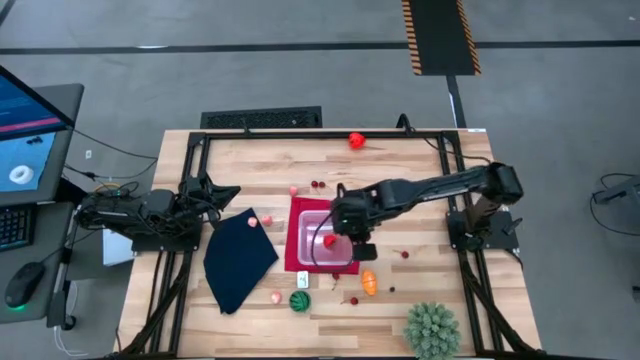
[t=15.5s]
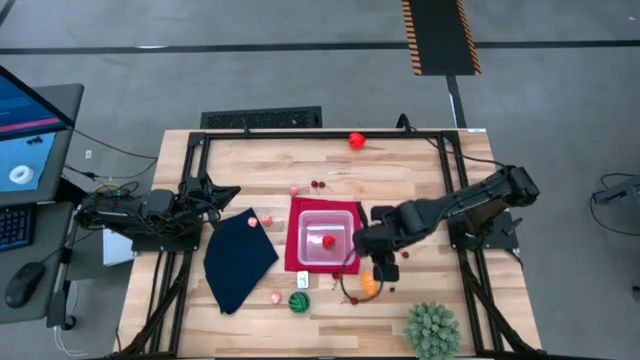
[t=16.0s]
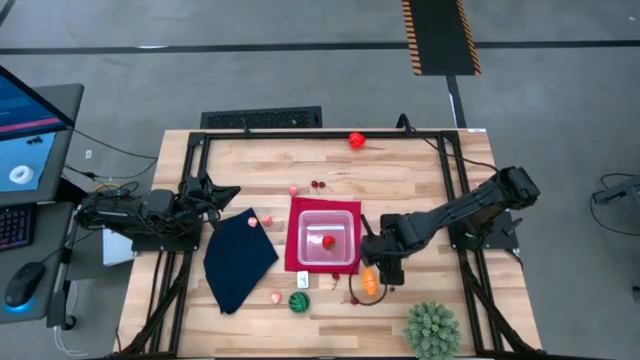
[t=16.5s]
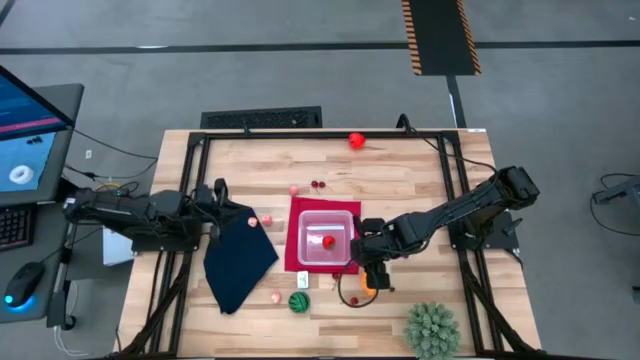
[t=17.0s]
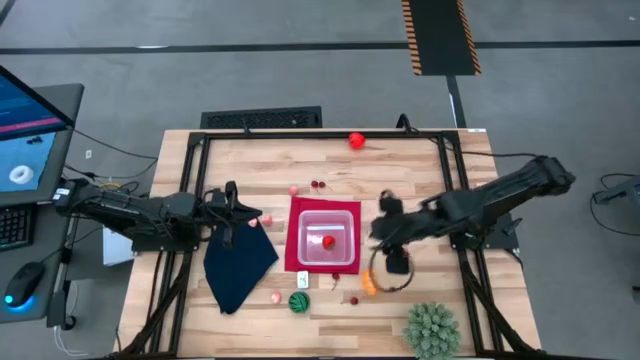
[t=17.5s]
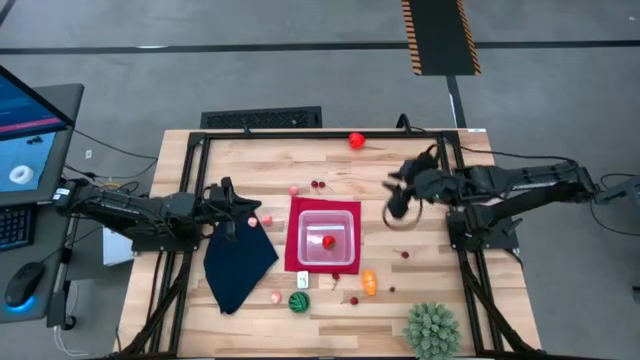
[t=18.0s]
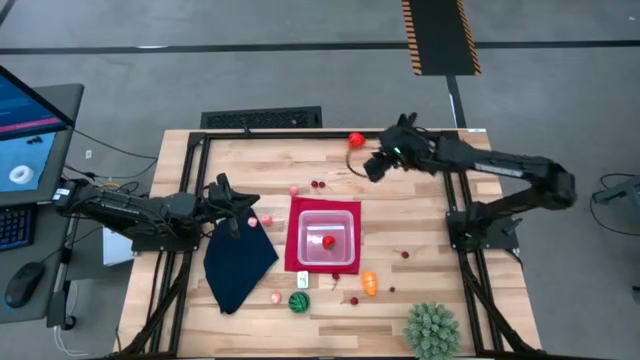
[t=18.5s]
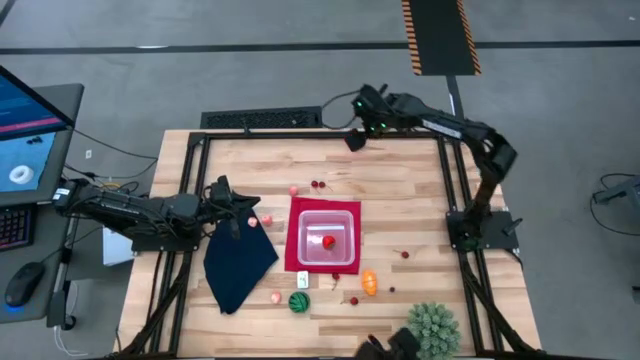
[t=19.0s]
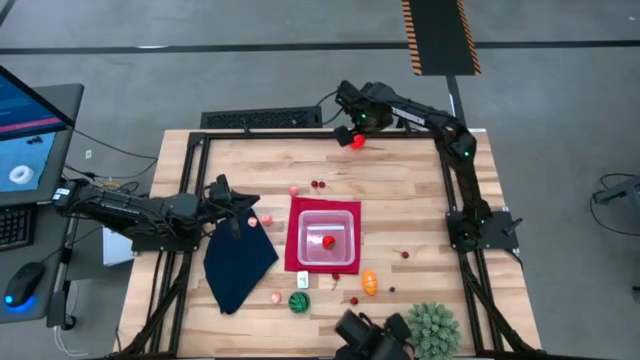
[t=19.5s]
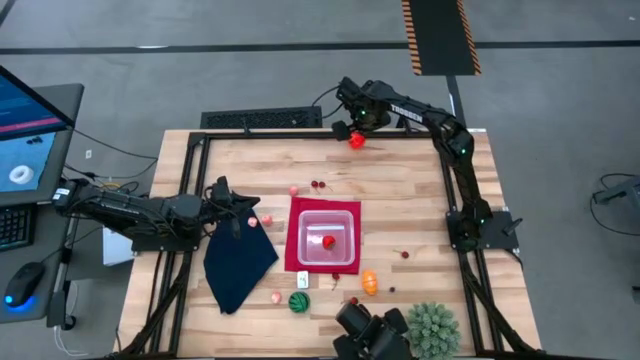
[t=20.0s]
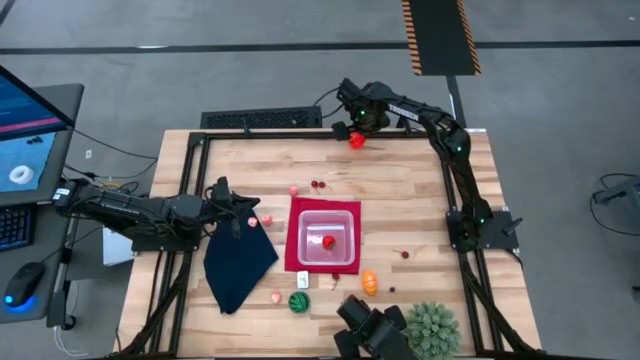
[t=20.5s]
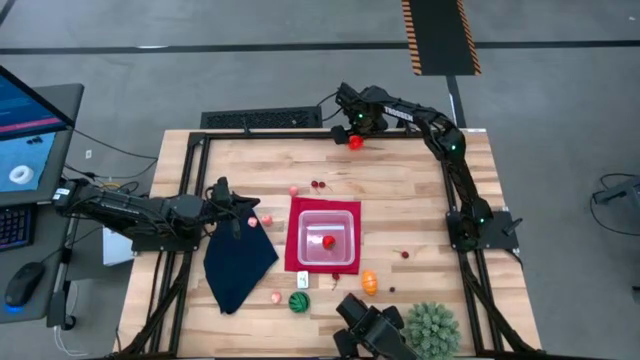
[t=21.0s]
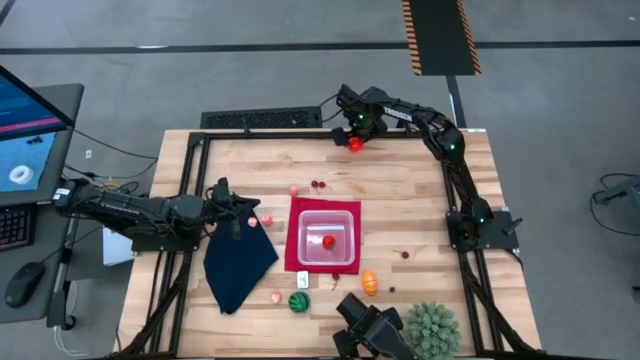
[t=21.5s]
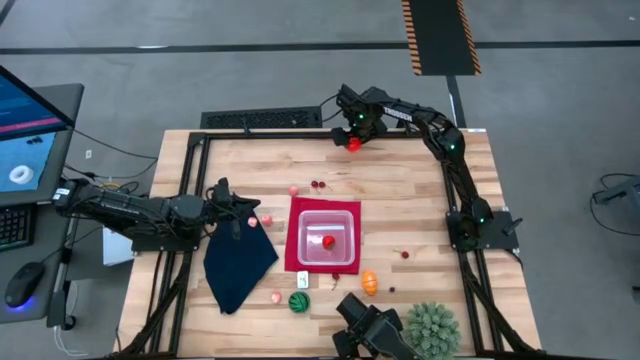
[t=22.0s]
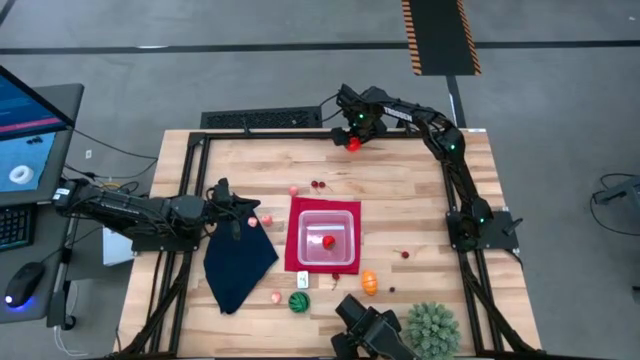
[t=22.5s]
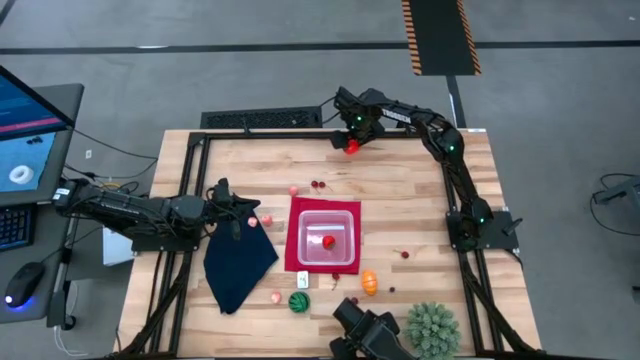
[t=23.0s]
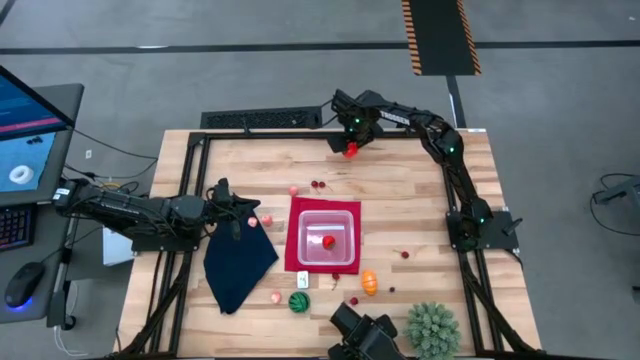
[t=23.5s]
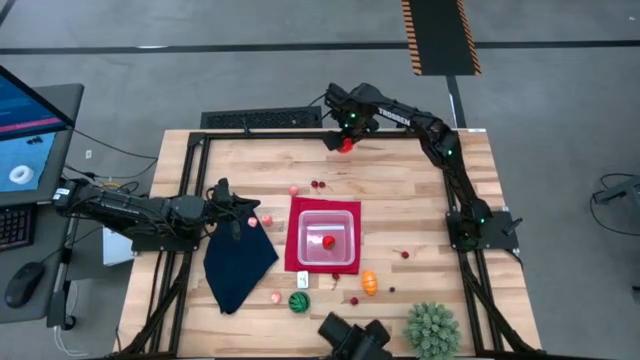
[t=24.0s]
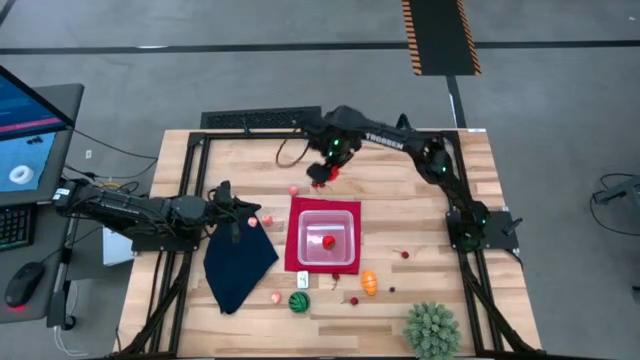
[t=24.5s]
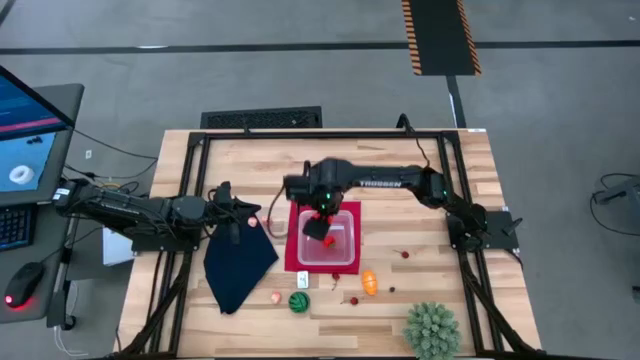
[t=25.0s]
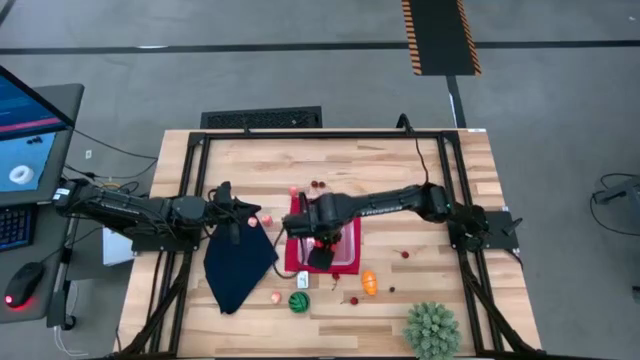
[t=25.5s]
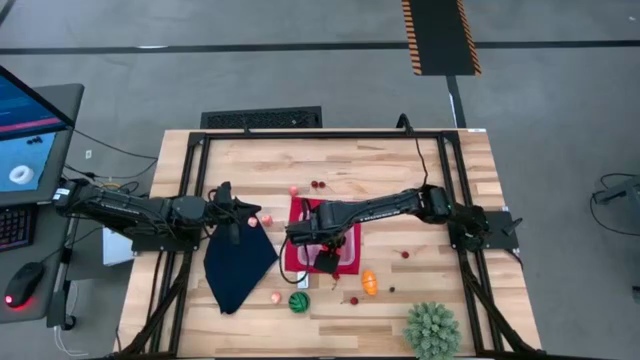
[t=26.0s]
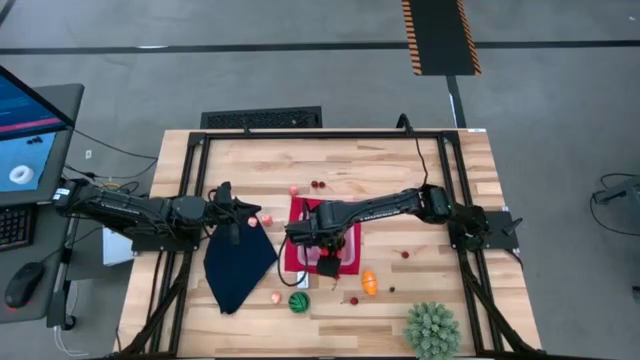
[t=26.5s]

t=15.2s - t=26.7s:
Task: Pick and placing Produce into tupperware
Put the apple in the transparent bin

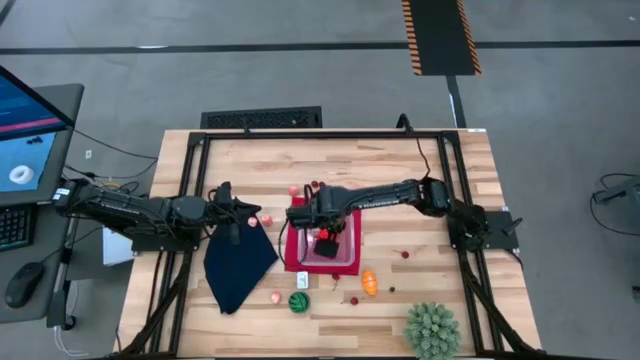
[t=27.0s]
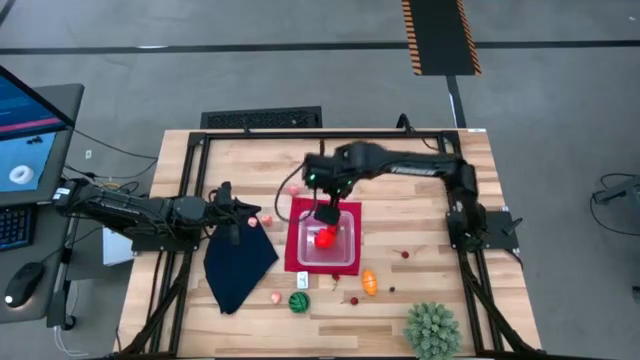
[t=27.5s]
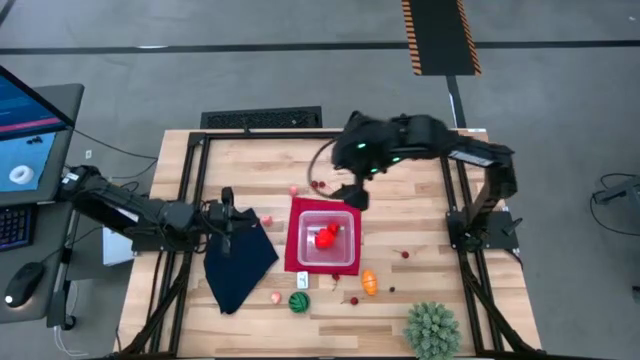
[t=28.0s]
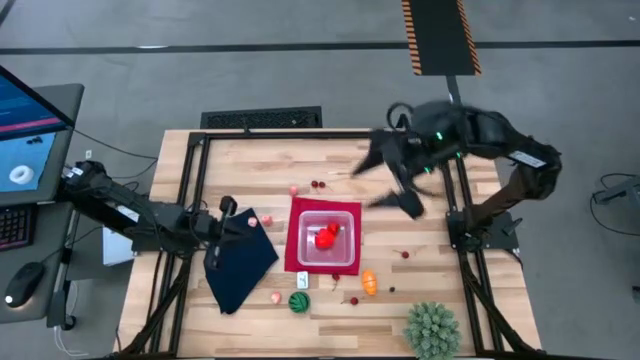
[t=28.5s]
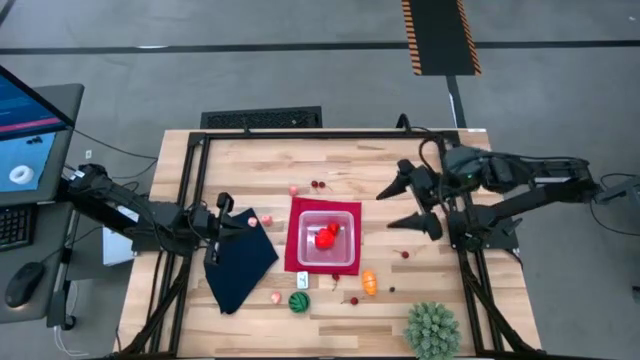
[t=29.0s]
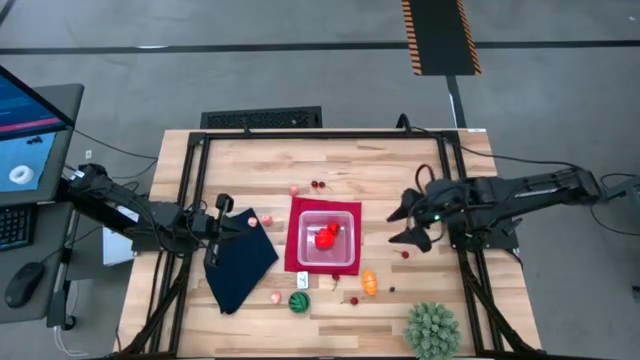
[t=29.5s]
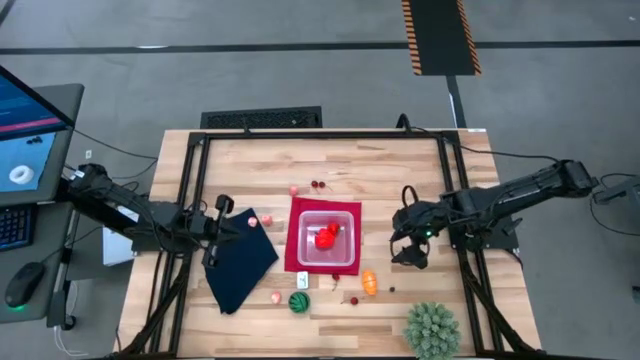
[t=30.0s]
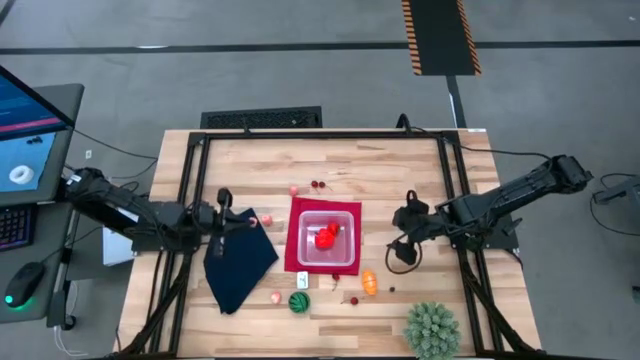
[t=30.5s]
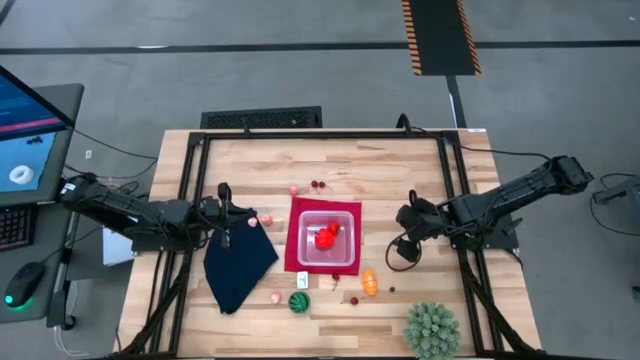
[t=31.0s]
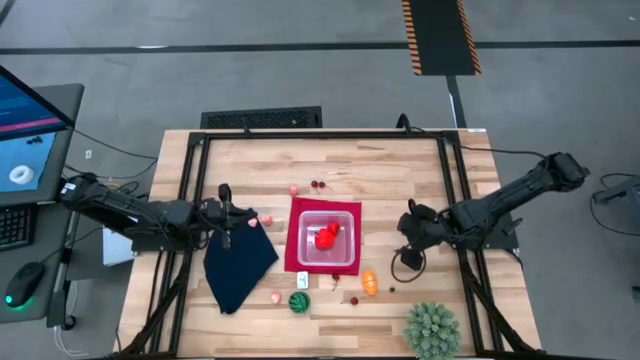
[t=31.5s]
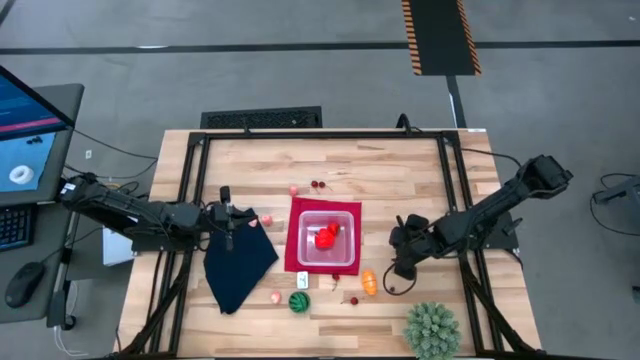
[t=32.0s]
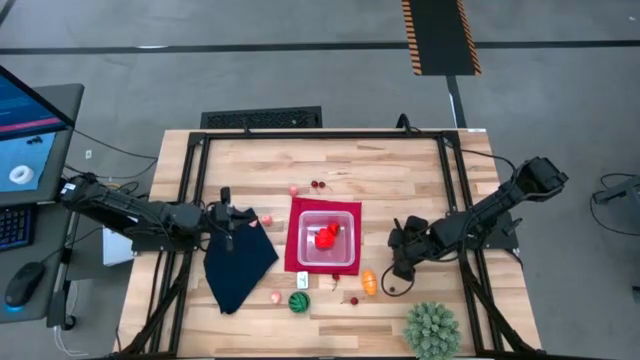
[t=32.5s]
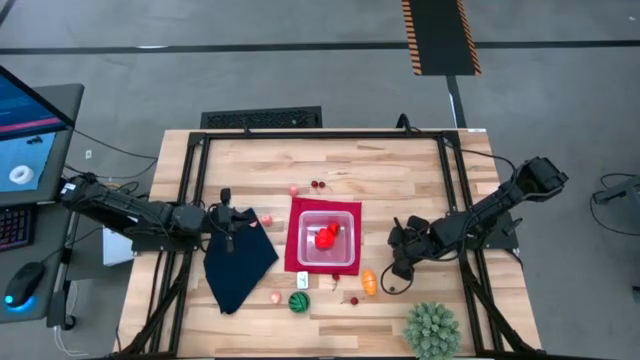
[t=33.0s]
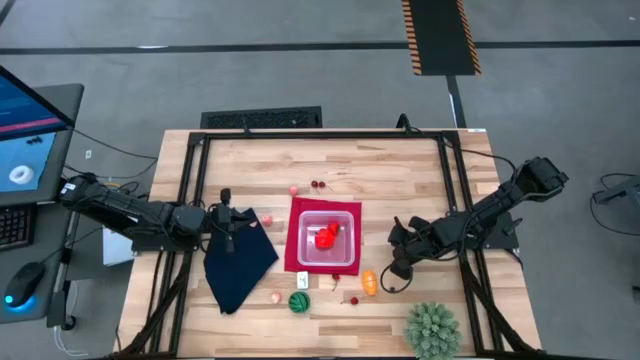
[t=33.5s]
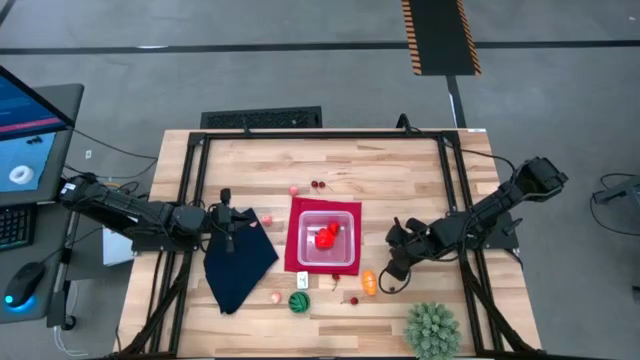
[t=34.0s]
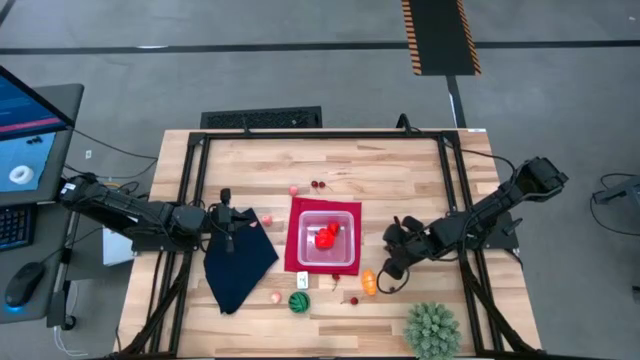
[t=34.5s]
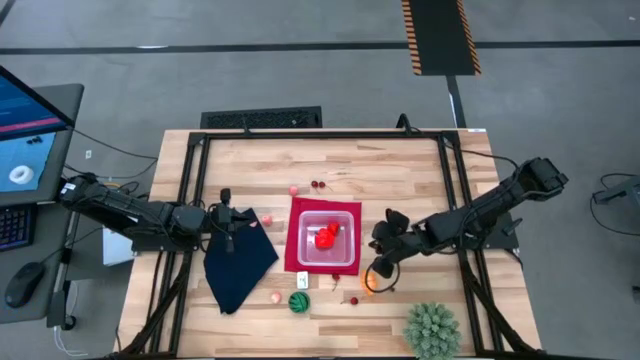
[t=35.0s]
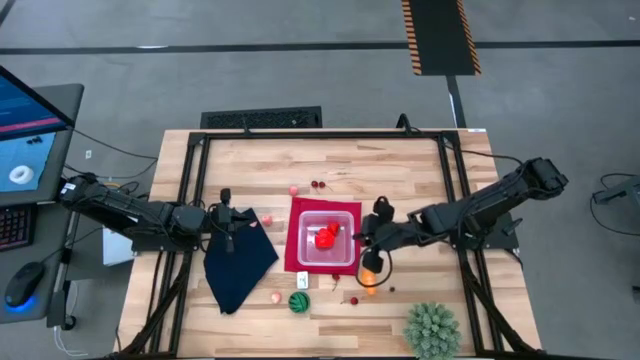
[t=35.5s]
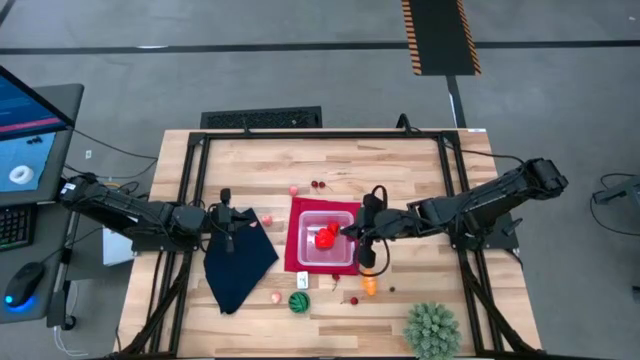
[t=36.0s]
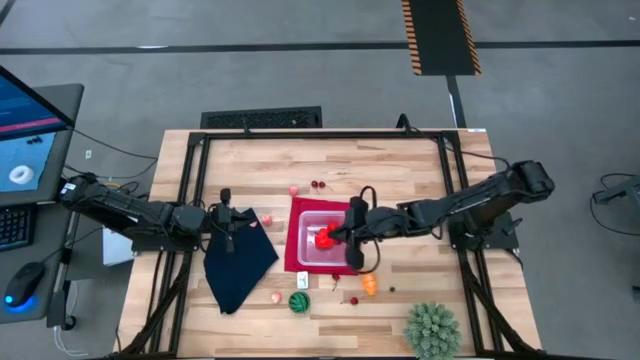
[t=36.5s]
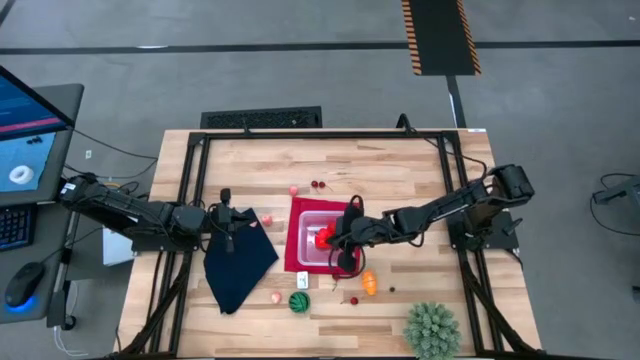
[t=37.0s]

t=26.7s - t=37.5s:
Put the cherry in the transparent bin
